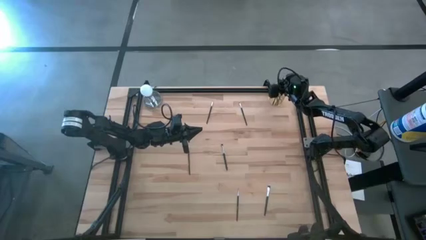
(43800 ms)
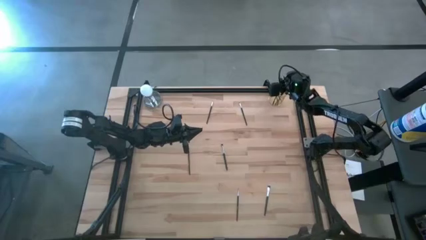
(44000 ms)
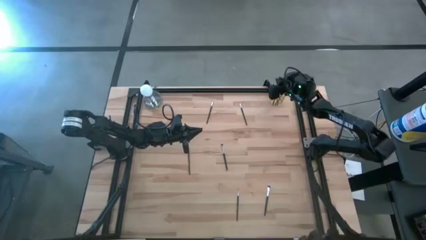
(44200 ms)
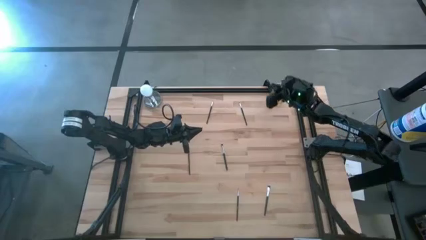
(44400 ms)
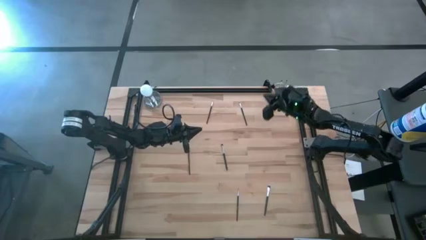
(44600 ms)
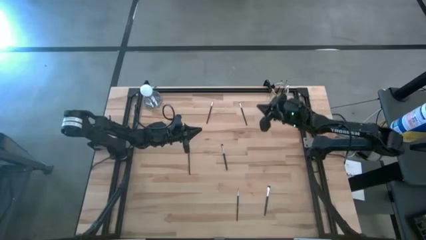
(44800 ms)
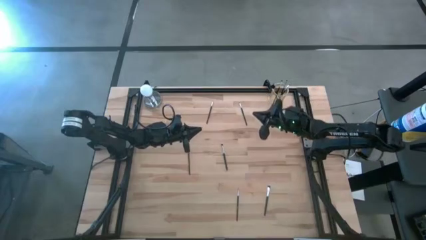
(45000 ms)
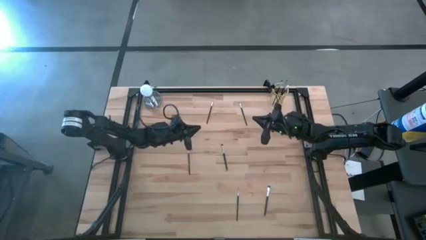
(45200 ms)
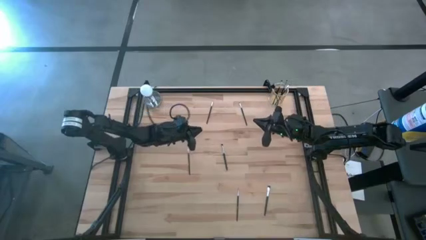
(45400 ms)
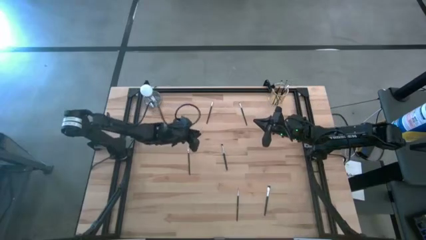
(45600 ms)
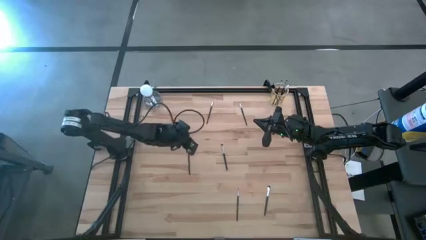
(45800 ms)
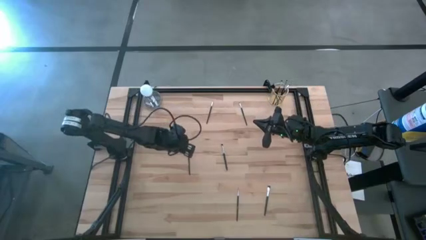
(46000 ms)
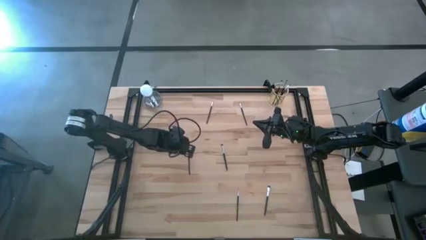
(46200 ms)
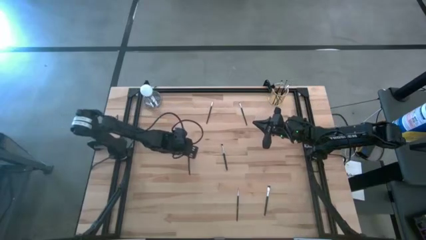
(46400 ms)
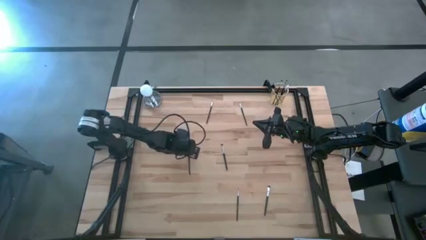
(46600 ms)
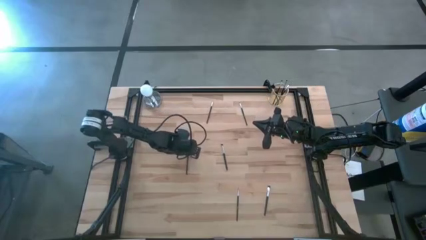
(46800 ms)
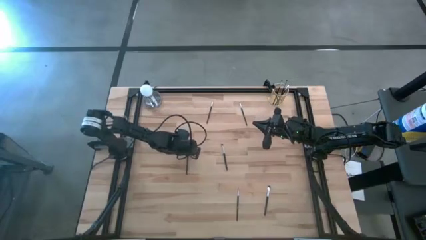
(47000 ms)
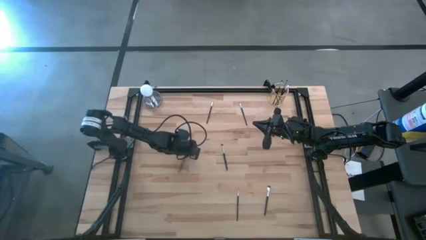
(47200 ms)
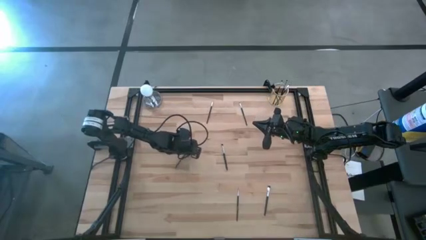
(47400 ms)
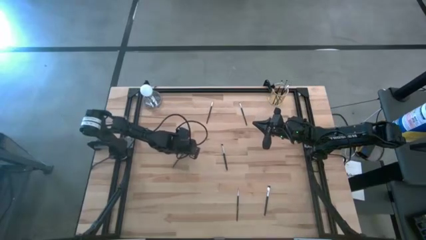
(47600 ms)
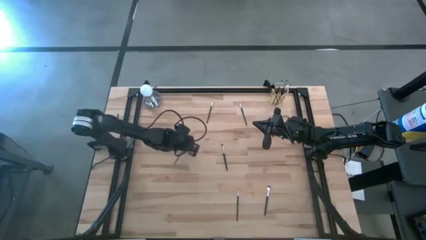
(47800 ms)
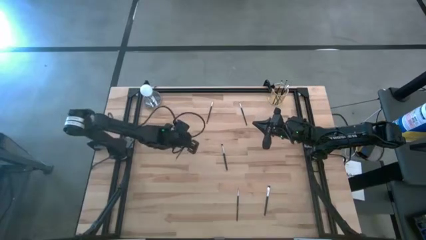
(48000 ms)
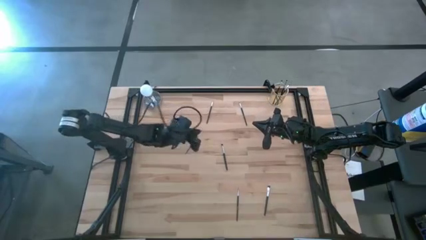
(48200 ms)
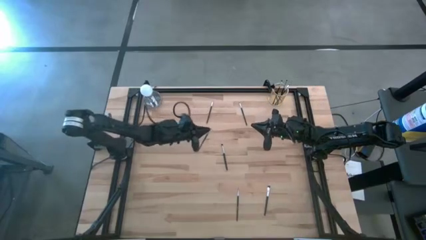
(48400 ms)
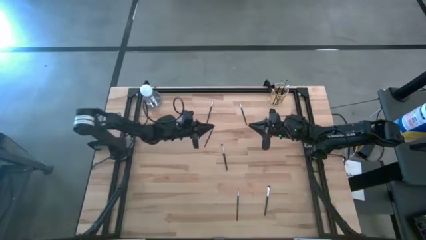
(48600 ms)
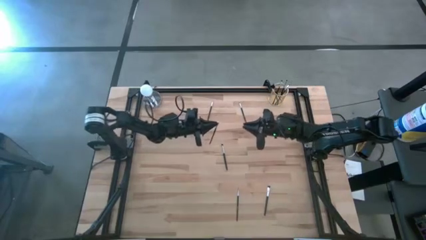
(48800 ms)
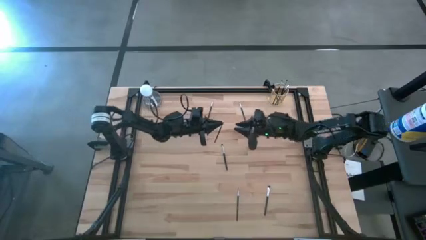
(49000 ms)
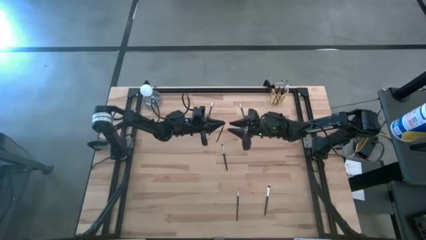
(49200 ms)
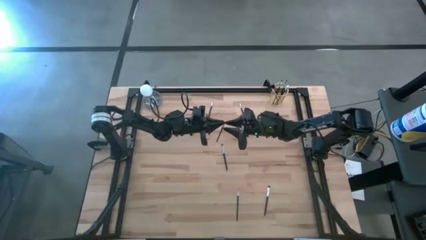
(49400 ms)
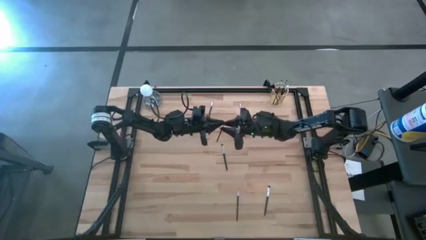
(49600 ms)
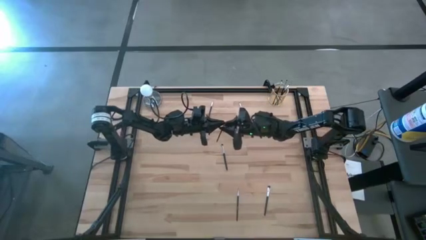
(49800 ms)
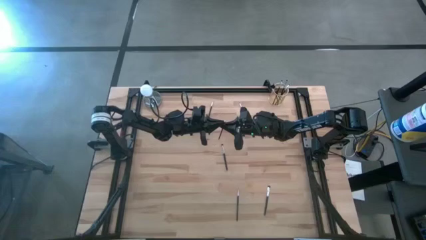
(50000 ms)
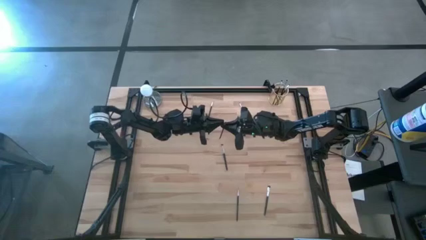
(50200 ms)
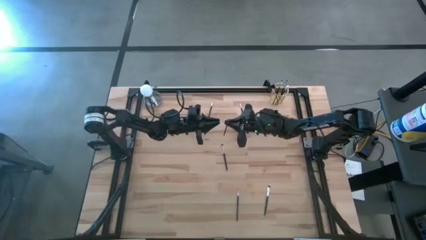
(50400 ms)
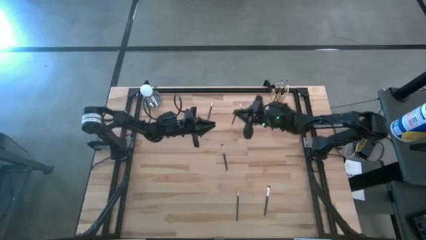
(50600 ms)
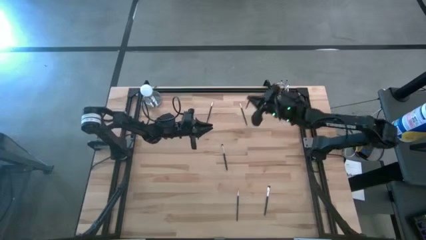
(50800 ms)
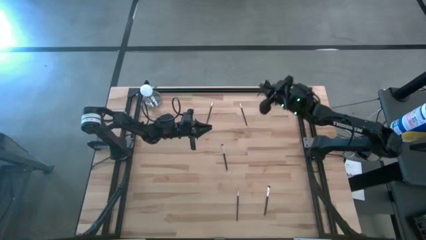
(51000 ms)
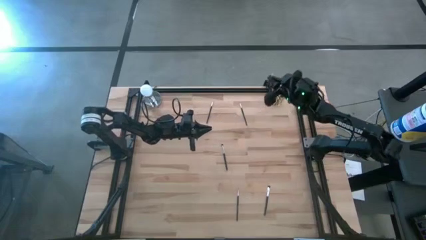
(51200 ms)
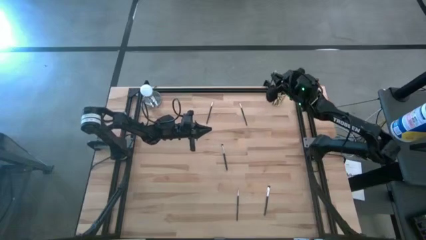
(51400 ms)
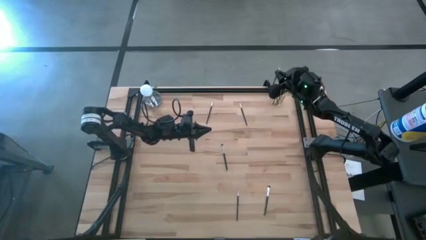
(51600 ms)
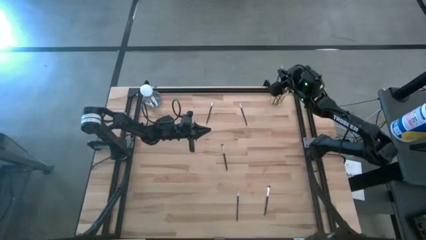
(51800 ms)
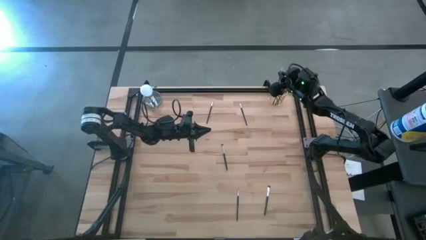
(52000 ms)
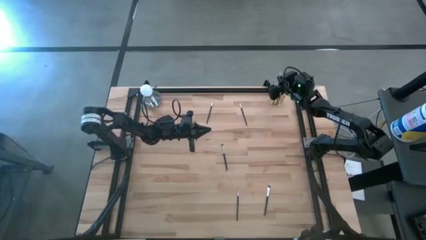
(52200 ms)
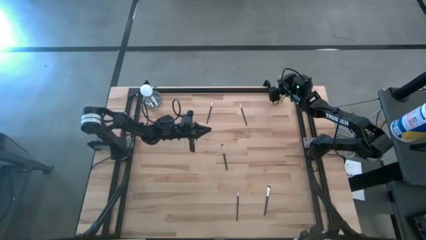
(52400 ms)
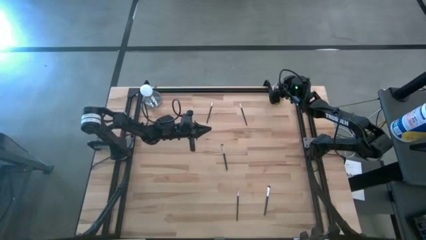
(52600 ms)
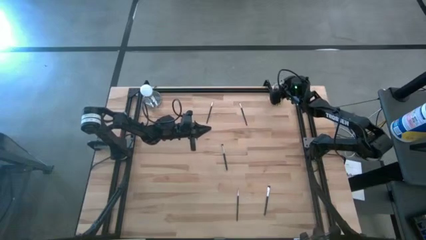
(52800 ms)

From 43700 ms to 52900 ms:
Task: Sort items
Put the black eyeshadow brush into the gold holder

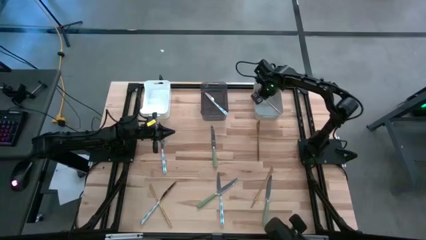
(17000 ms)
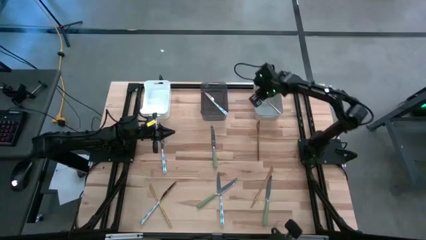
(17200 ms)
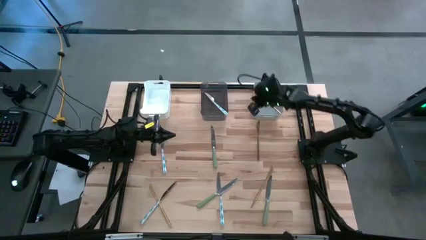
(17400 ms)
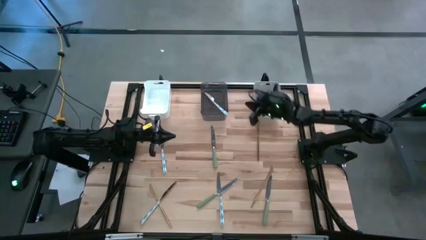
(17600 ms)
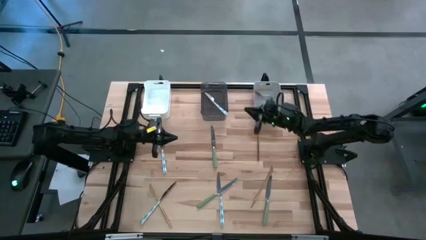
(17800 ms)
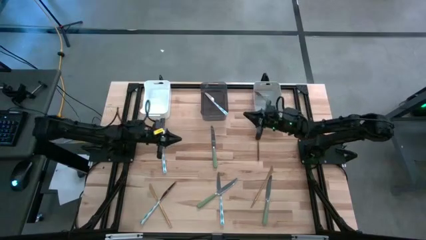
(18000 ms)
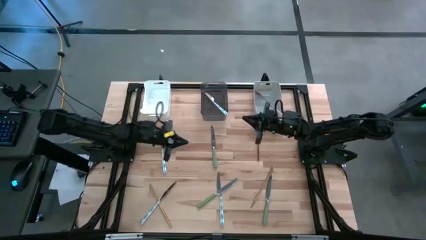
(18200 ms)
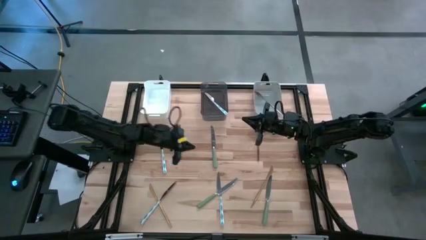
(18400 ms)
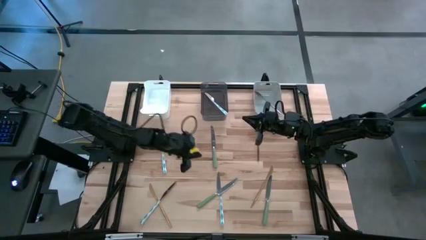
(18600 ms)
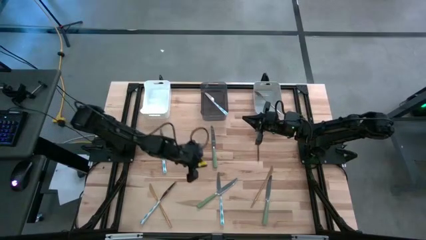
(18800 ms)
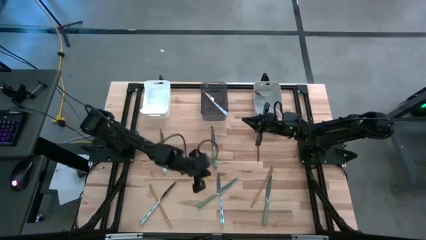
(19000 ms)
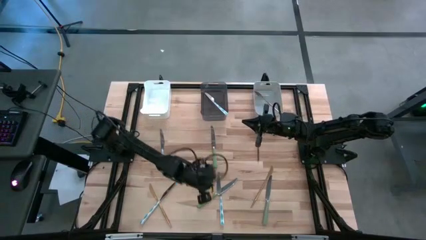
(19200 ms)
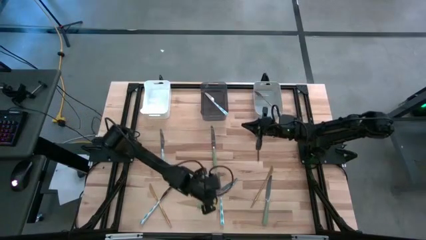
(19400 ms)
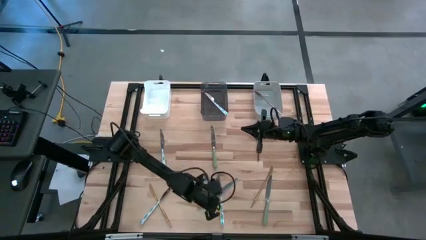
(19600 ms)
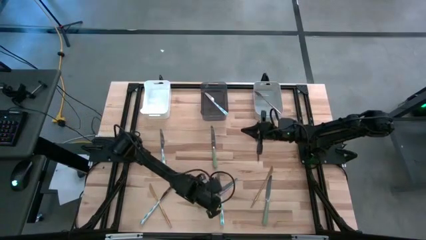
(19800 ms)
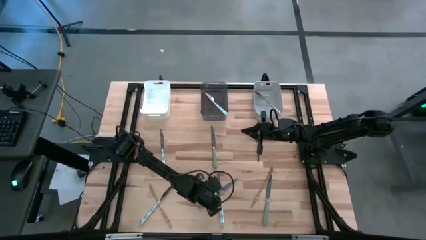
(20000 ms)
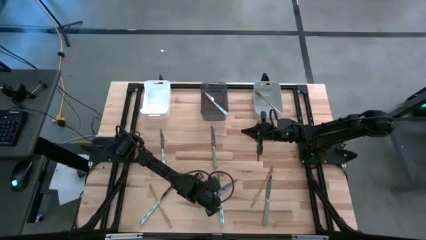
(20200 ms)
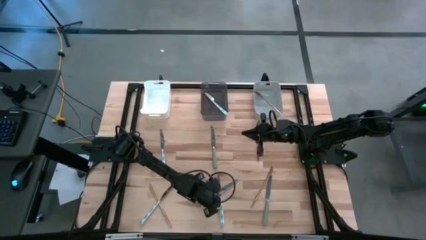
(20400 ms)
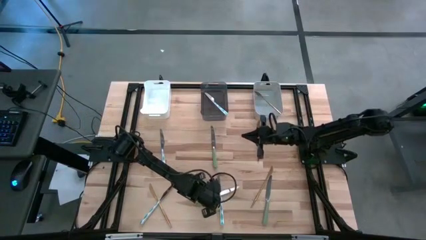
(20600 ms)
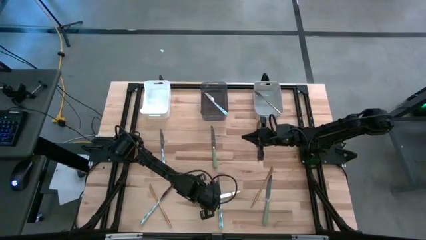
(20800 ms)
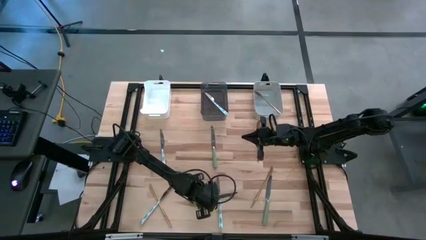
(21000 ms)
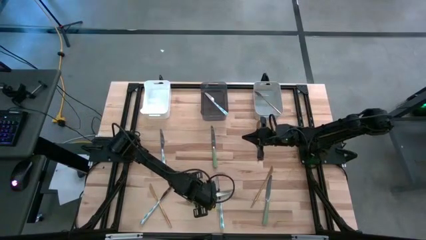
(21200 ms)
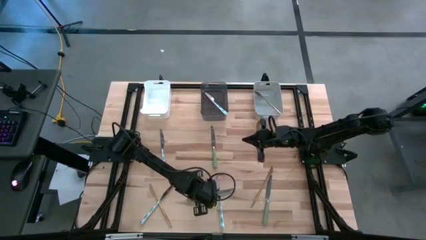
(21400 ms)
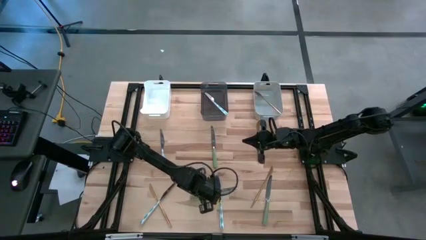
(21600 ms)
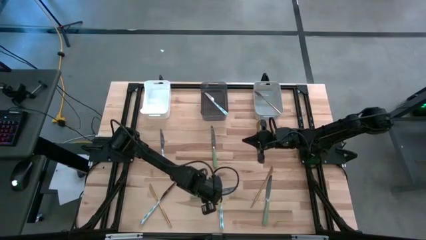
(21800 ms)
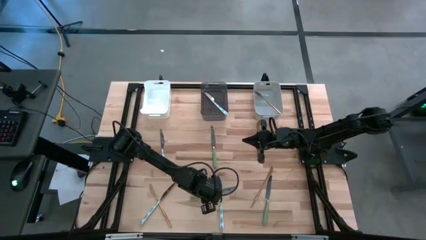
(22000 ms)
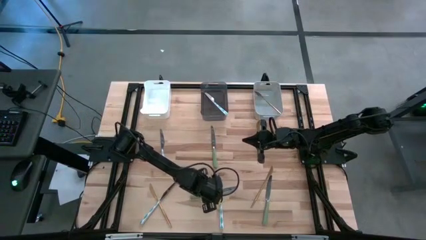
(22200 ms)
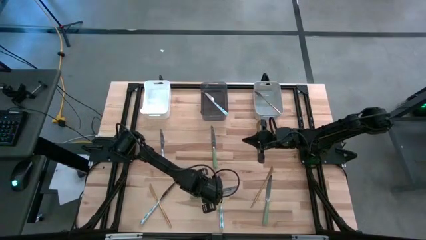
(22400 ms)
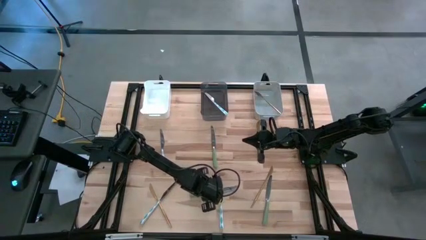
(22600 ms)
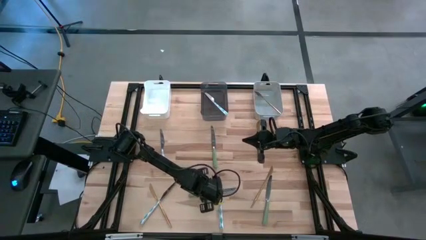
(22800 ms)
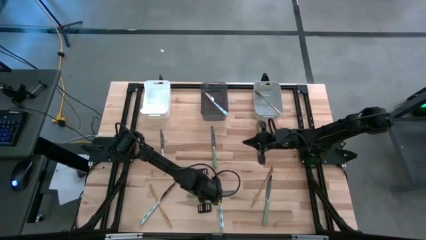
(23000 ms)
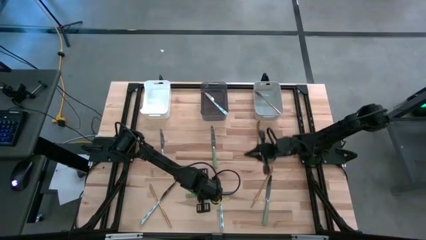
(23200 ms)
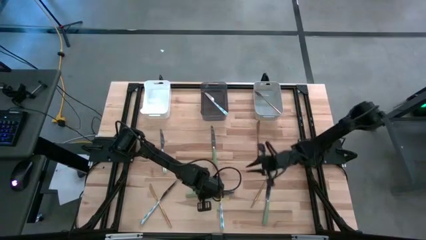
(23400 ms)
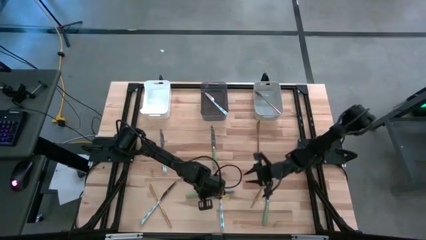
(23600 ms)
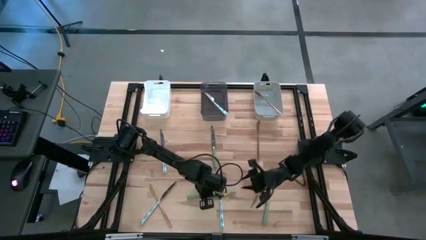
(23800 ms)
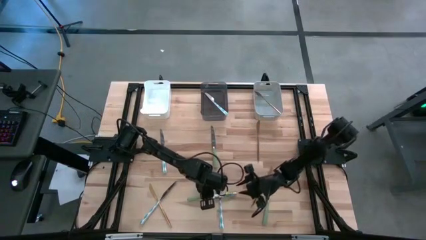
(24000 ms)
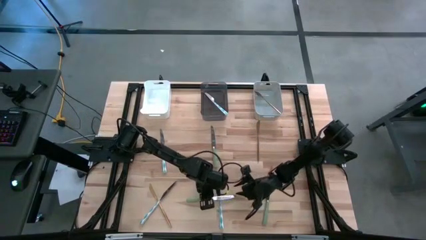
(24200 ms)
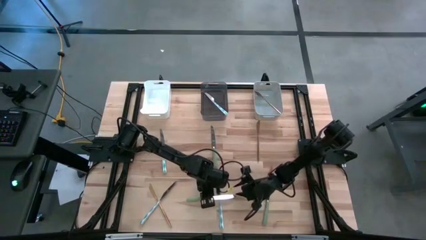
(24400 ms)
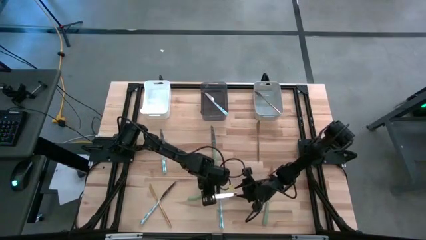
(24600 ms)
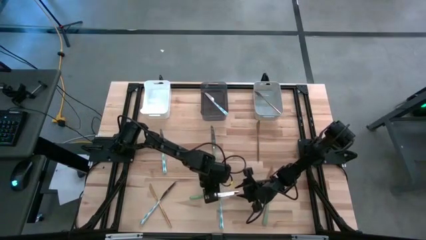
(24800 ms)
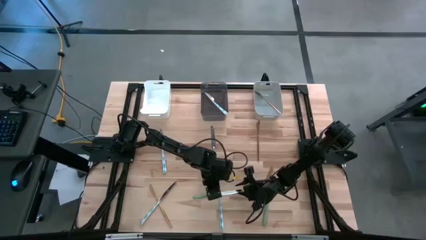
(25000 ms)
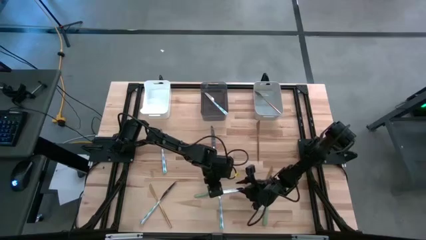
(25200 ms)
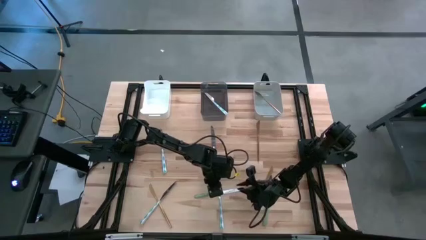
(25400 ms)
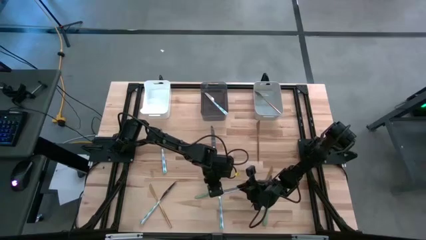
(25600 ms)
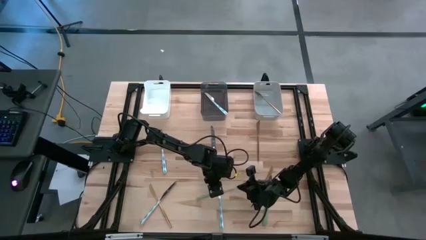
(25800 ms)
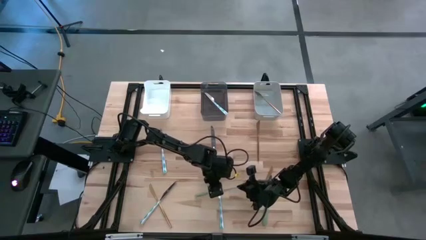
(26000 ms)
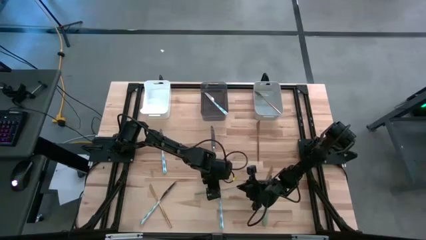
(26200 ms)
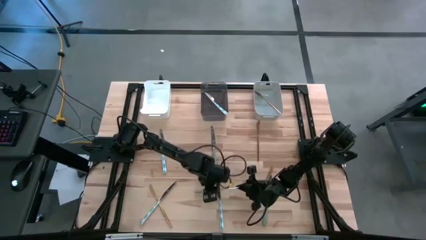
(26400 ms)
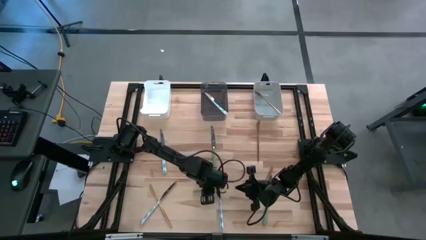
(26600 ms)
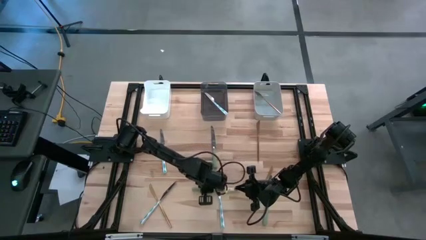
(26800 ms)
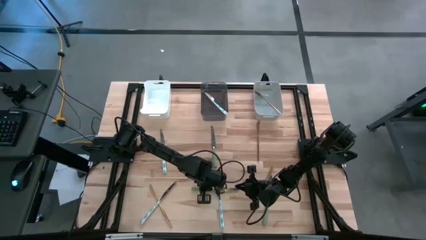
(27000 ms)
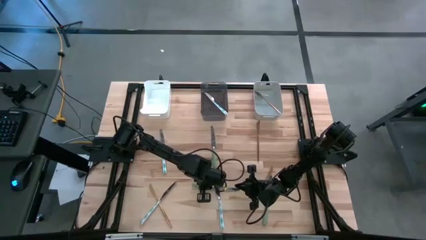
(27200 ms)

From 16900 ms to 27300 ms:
Task: Sort silverware by color (type)
Put the bottom left green table knife into the white bin
